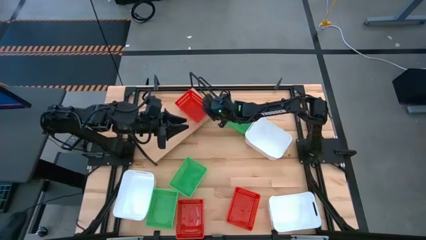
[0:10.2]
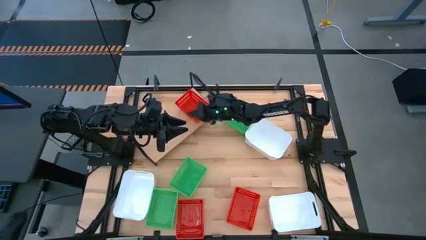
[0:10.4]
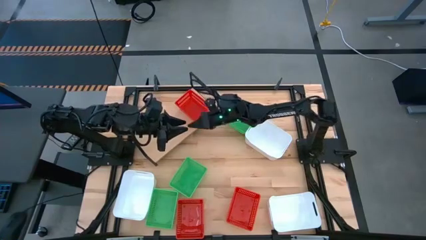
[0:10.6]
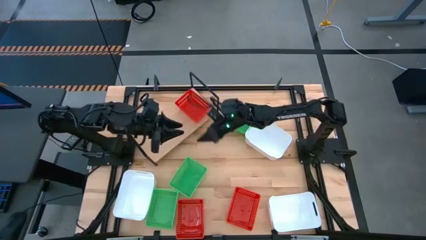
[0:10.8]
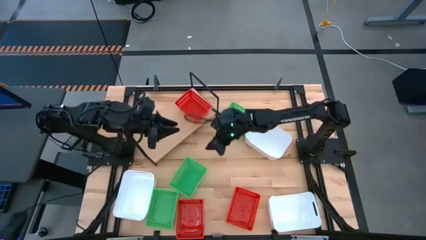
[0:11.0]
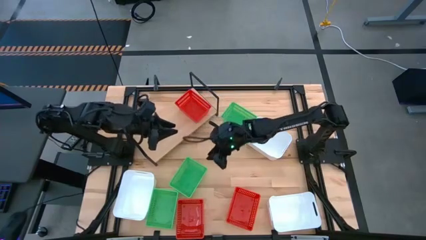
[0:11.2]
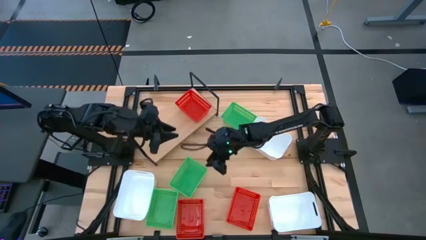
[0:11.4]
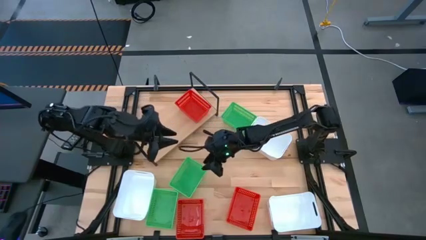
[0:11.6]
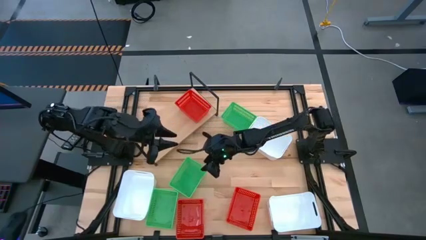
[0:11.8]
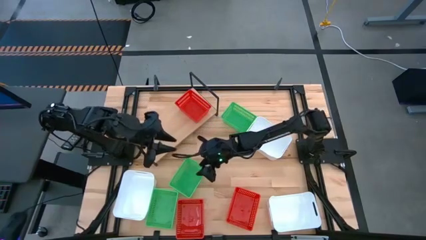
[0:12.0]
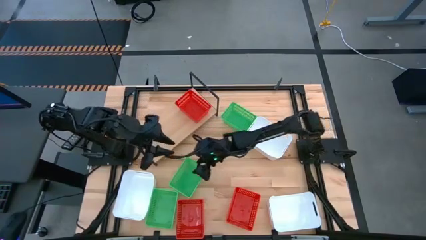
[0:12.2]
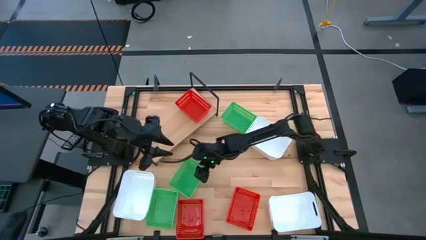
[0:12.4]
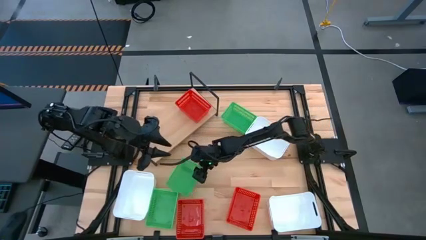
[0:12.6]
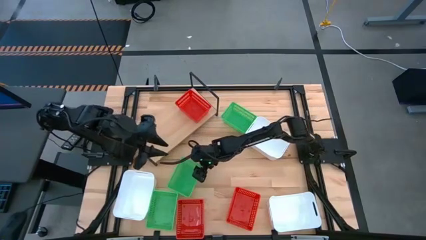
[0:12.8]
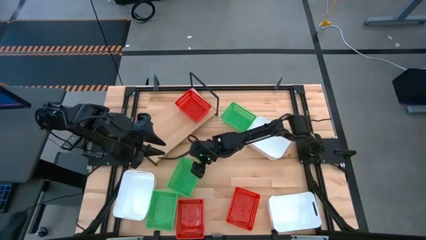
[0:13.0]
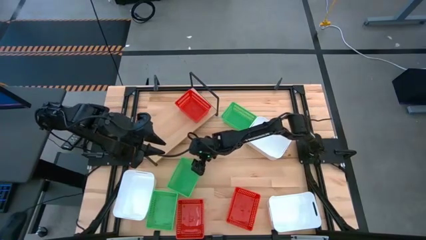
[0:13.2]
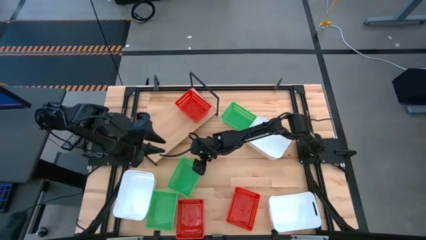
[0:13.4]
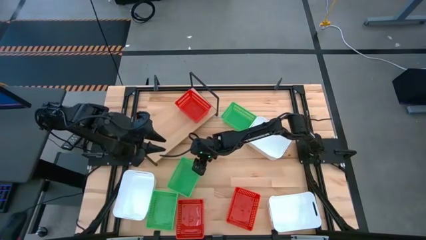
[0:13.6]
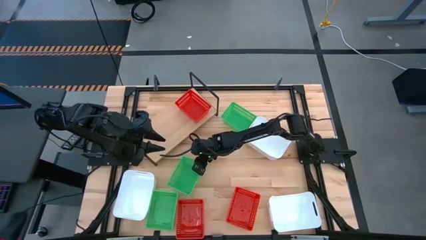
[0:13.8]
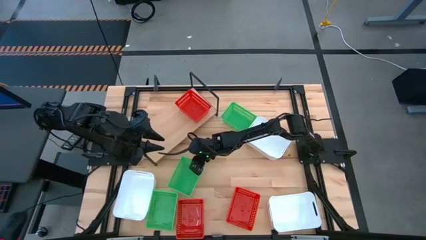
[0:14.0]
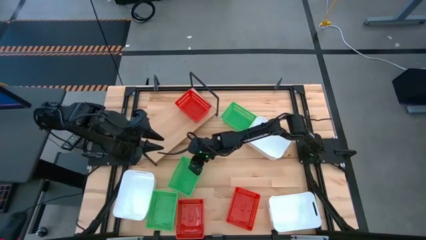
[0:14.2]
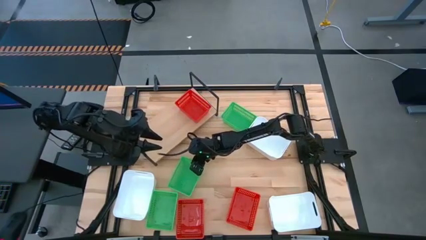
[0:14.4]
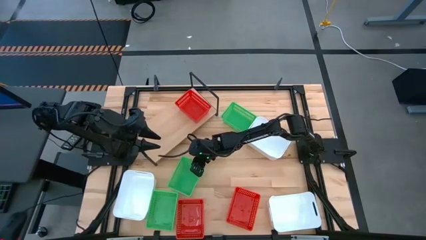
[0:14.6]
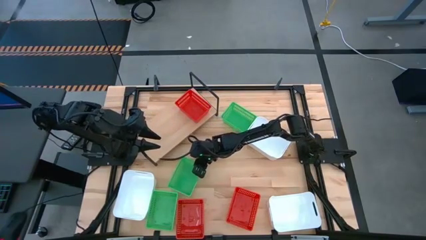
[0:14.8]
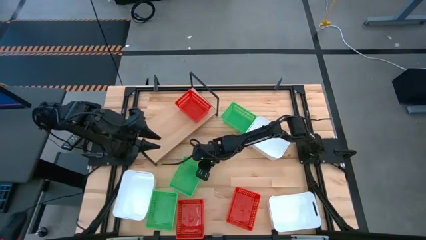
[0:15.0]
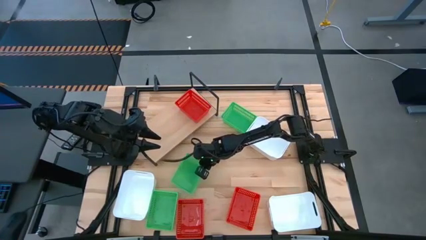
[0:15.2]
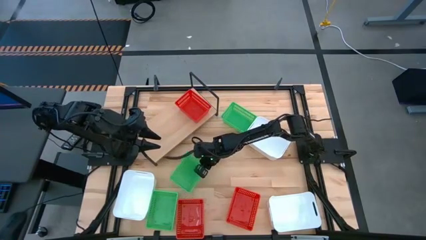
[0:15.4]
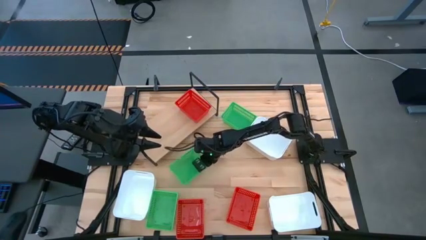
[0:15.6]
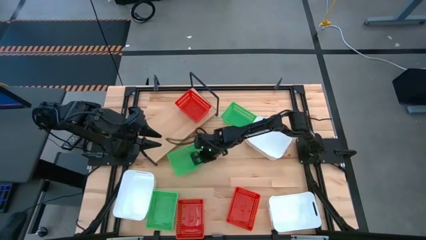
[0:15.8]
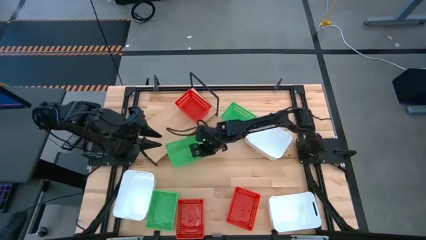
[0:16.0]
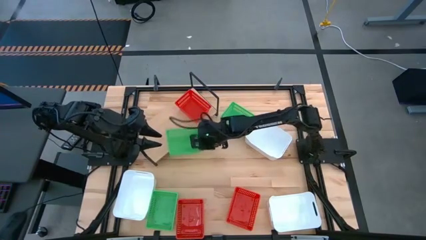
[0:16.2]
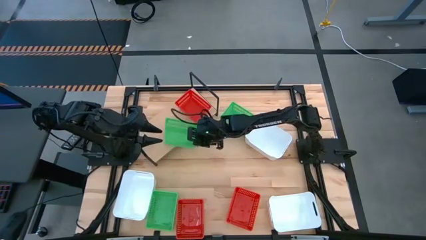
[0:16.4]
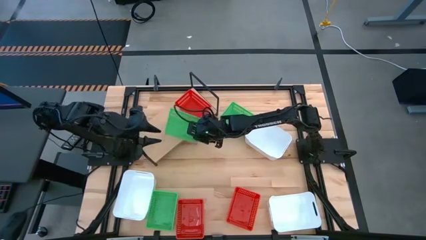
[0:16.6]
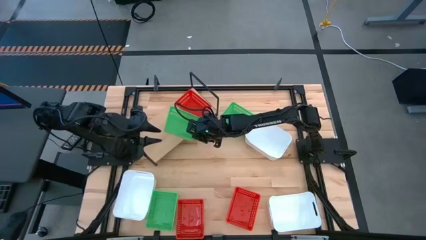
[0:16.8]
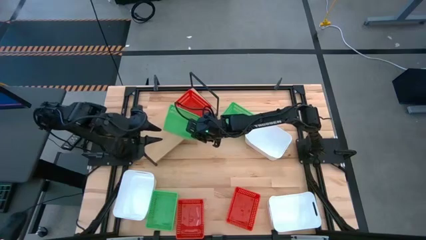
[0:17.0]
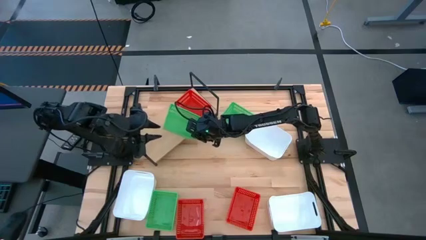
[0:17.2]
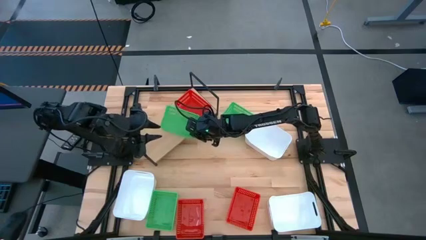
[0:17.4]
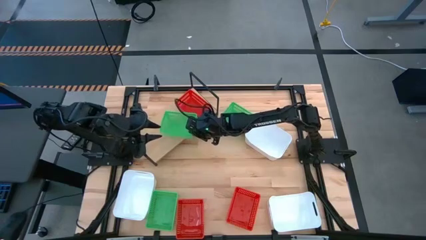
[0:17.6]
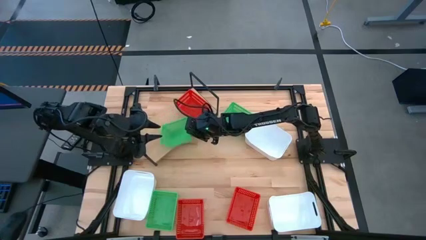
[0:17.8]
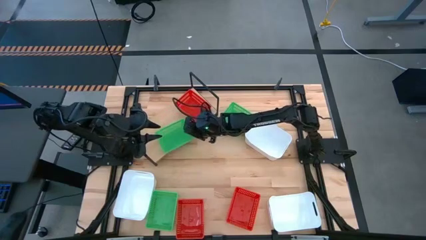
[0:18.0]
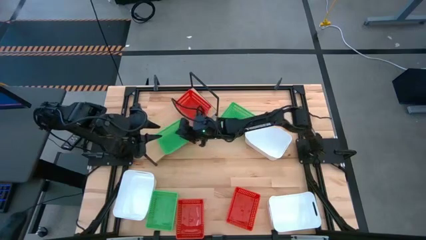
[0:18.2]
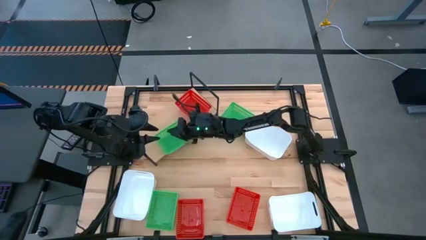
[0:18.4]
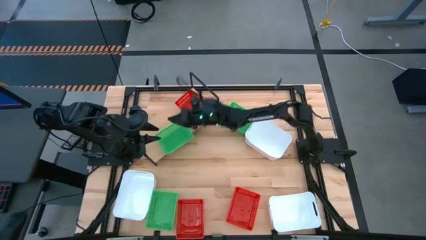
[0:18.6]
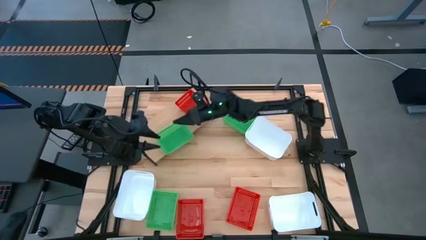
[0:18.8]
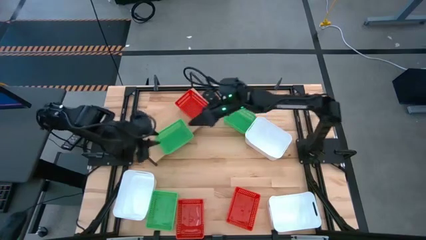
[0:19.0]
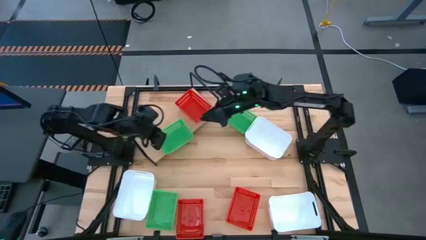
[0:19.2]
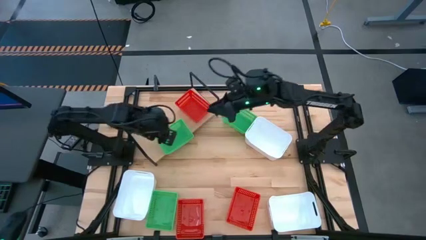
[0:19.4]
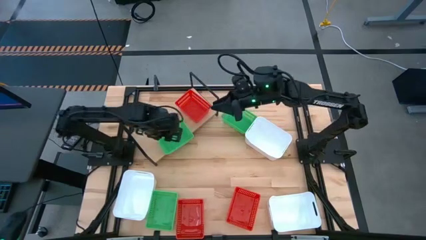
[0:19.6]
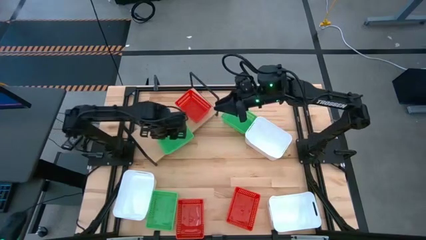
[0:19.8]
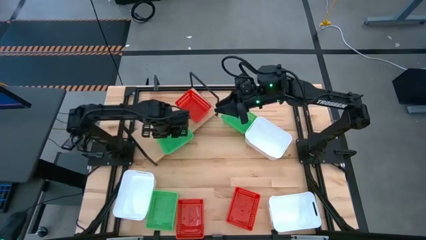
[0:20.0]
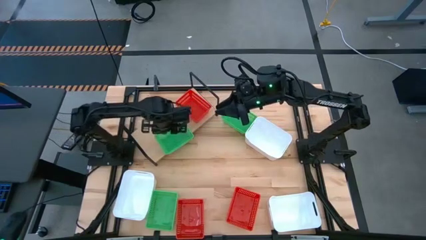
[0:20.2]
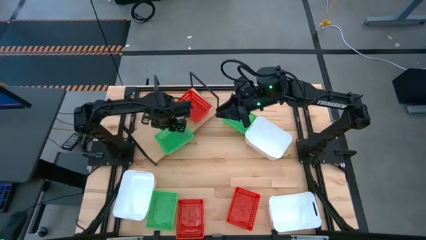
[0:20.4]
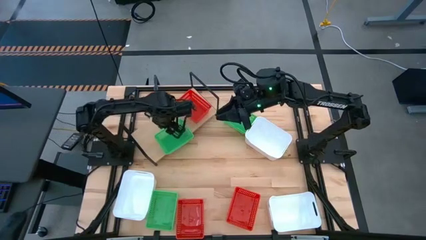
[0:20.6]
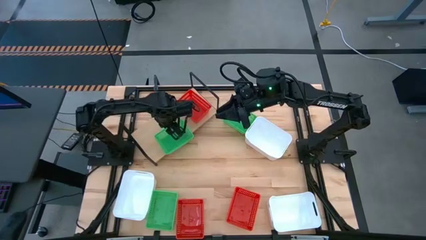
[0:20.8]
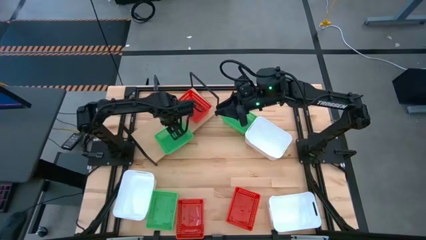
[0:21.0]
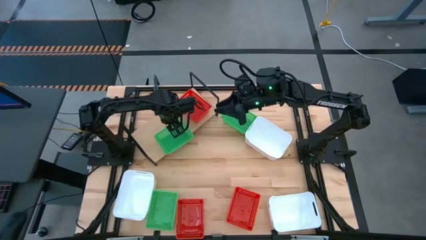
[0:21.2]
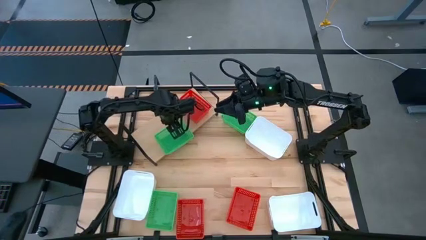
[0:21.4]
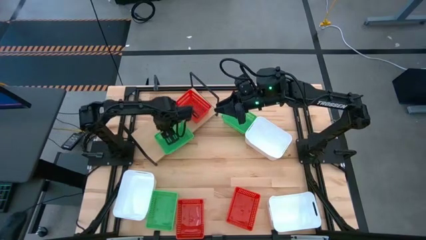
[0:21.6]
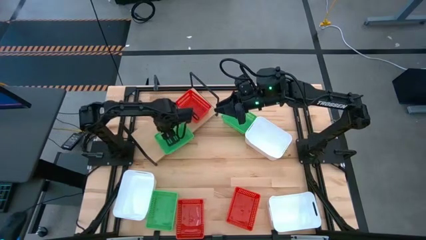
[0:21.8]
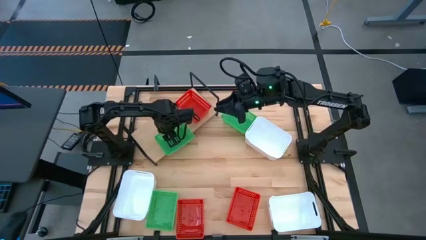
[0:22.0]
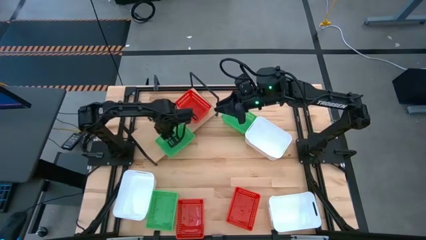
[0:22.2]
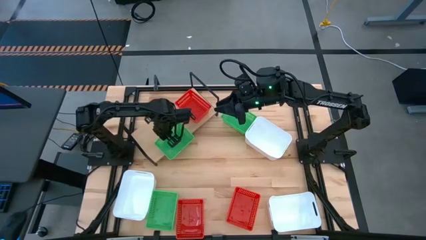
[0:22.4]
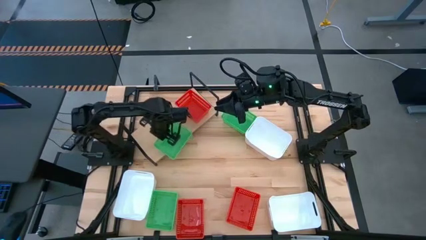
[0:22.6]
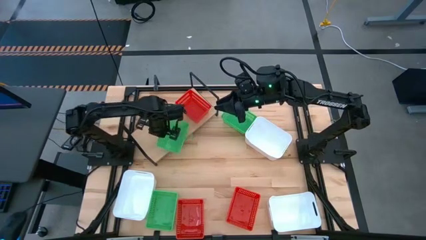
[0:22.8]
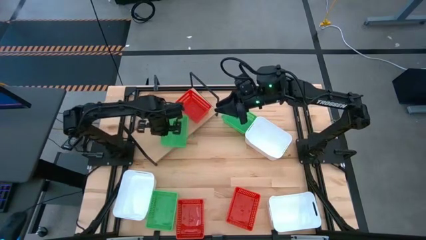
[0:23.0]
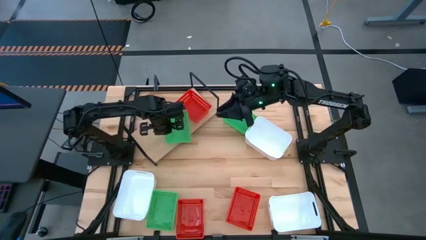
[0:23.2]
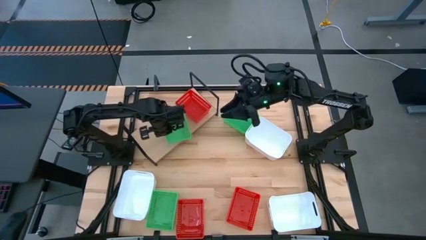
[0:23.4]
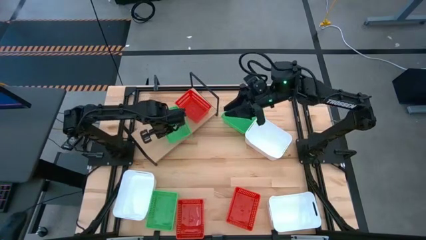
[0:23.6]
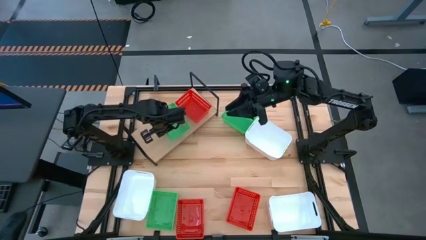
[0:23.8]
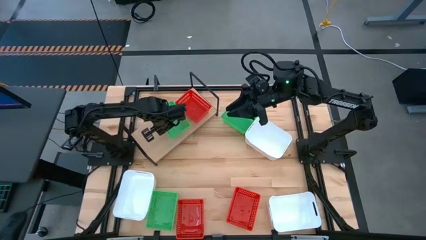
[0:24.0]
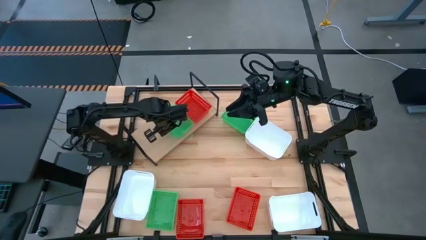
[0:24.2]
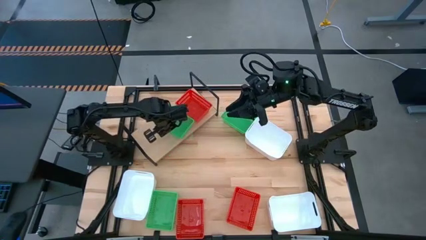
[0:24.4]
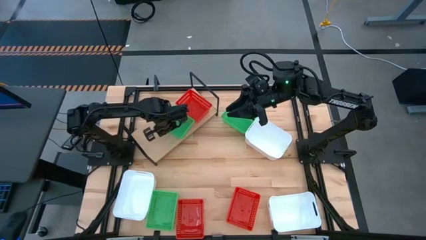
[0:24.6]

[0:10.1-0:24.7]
Task: Stack baskets on shelf by color
Put the middle green bin on the shelf
